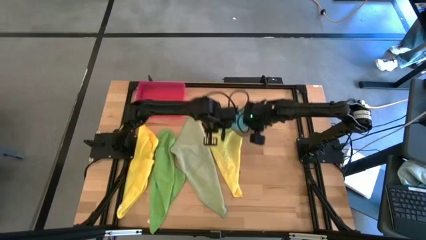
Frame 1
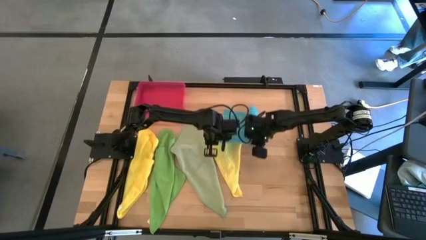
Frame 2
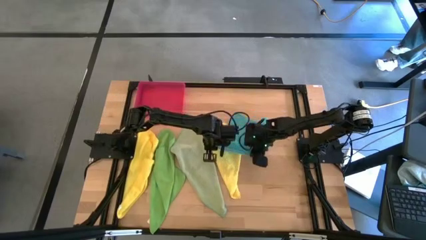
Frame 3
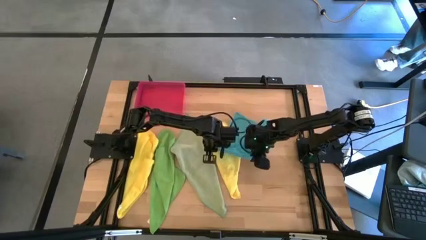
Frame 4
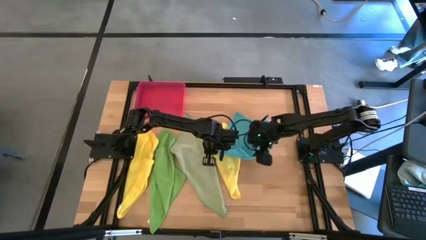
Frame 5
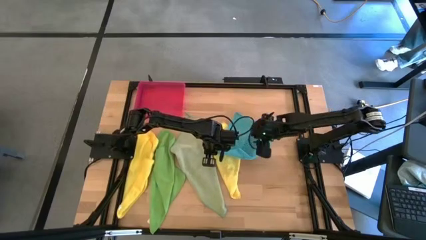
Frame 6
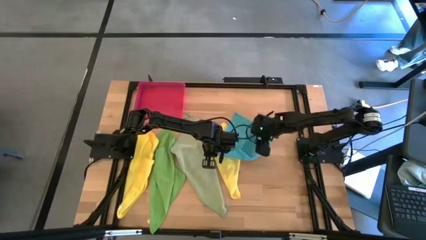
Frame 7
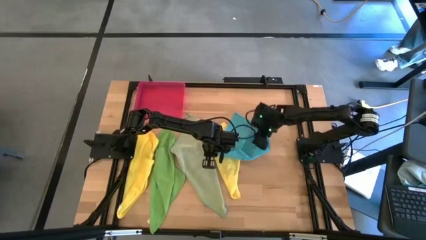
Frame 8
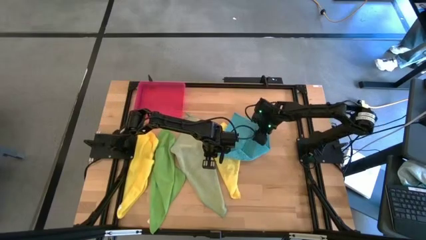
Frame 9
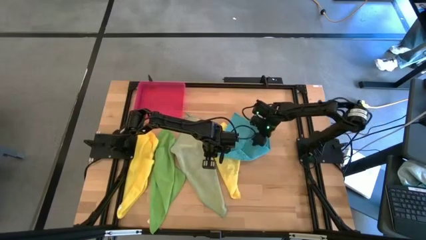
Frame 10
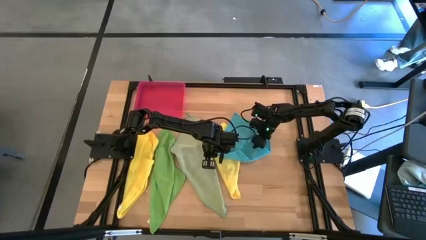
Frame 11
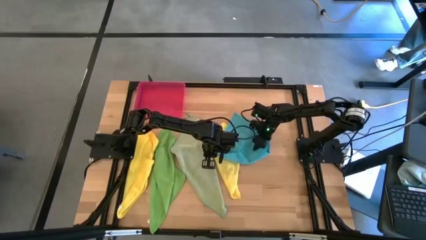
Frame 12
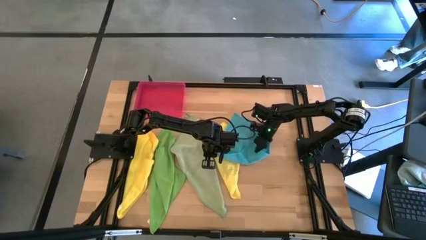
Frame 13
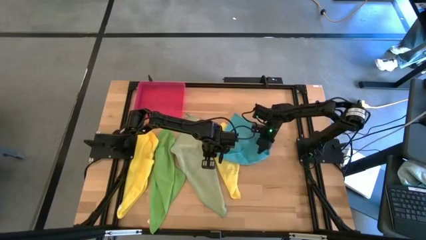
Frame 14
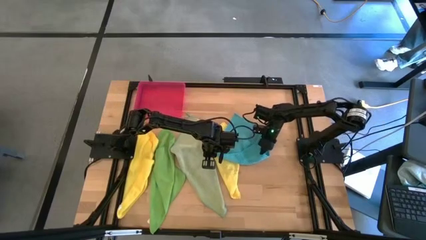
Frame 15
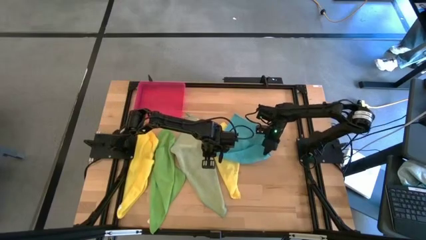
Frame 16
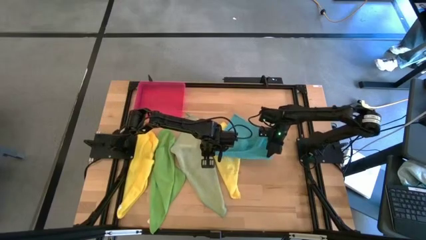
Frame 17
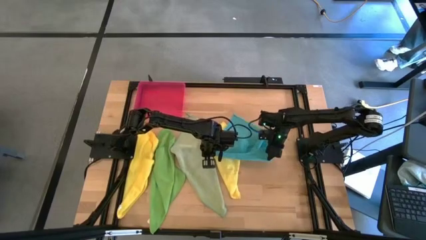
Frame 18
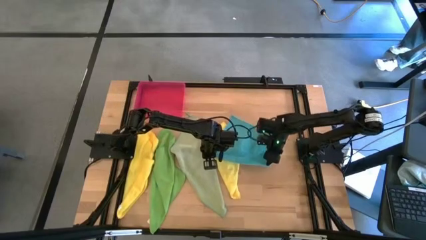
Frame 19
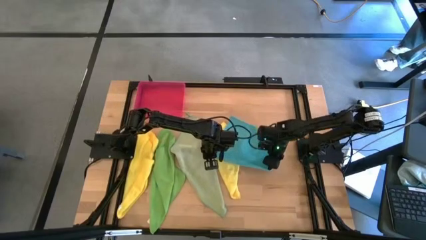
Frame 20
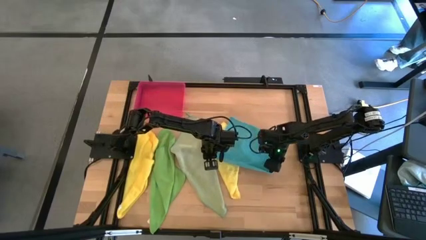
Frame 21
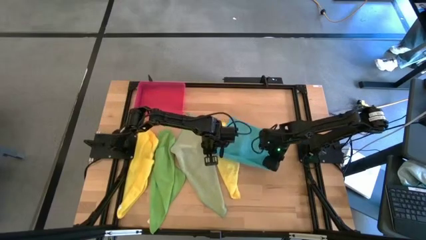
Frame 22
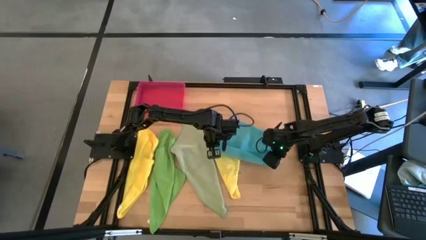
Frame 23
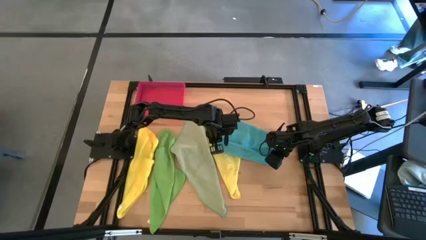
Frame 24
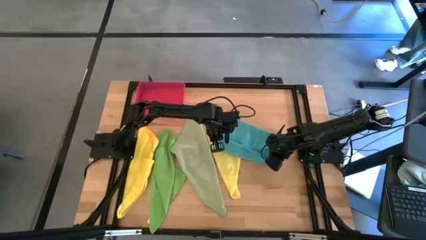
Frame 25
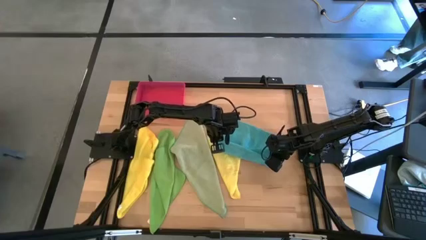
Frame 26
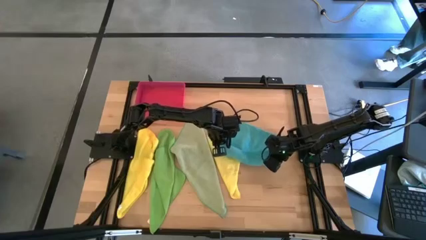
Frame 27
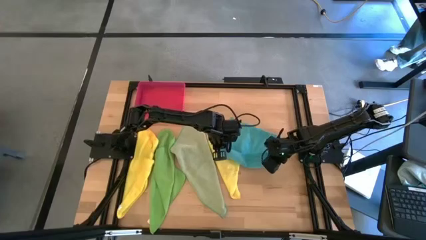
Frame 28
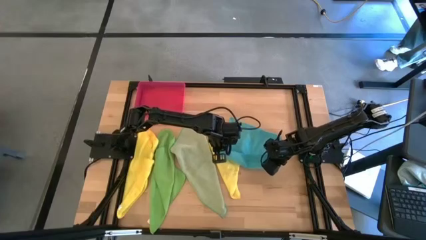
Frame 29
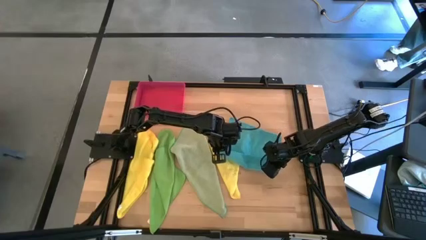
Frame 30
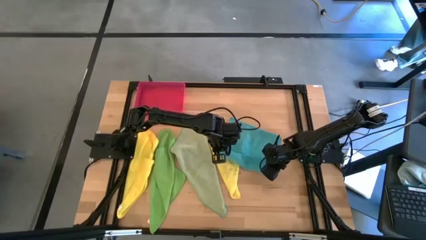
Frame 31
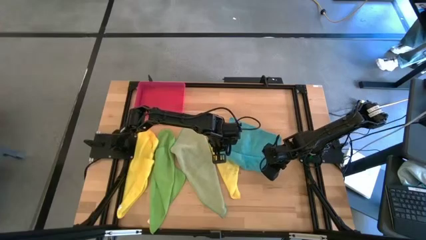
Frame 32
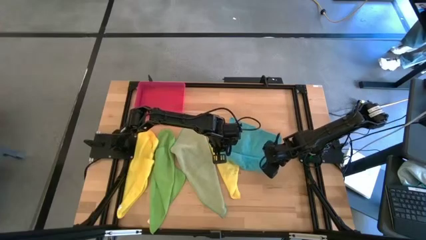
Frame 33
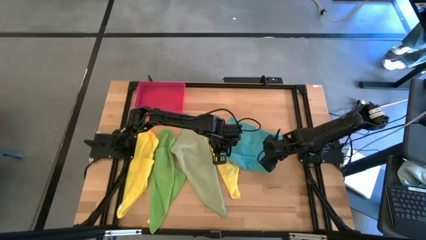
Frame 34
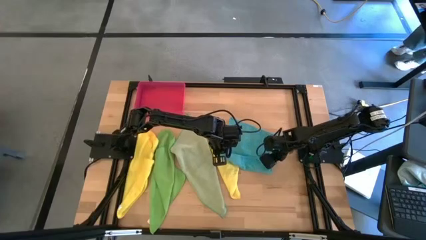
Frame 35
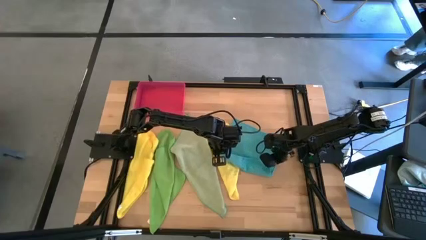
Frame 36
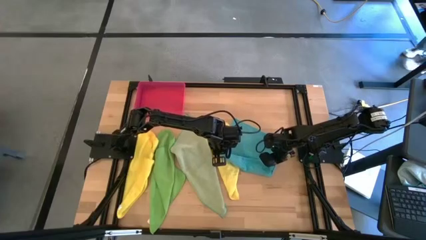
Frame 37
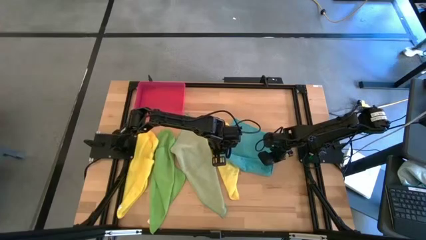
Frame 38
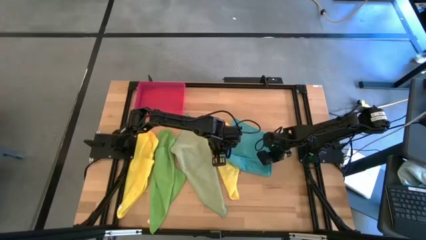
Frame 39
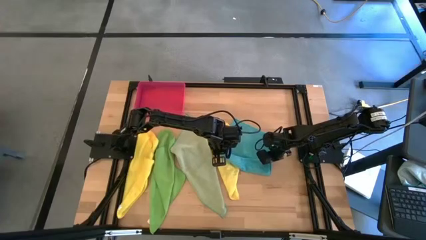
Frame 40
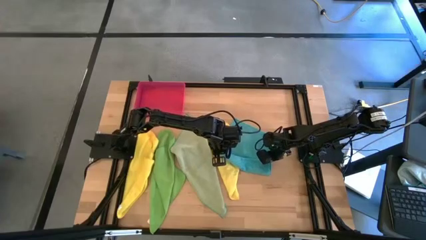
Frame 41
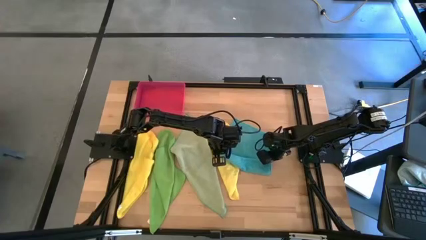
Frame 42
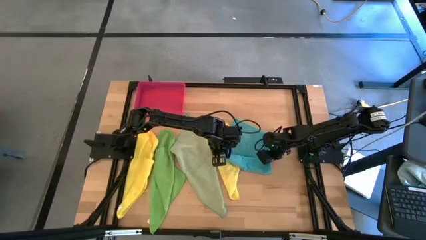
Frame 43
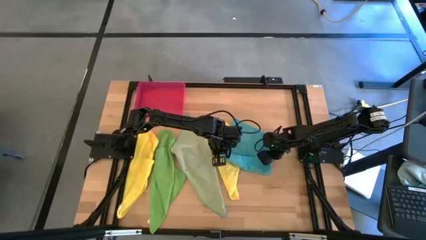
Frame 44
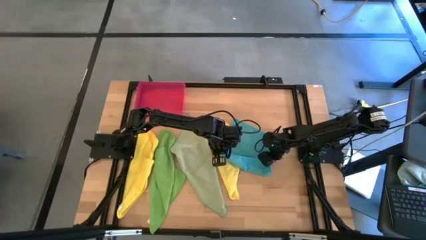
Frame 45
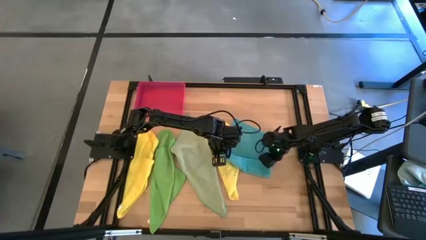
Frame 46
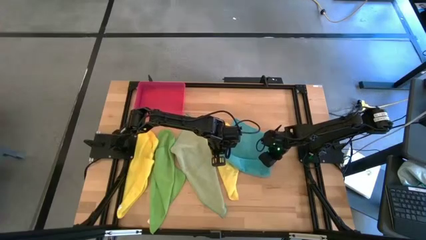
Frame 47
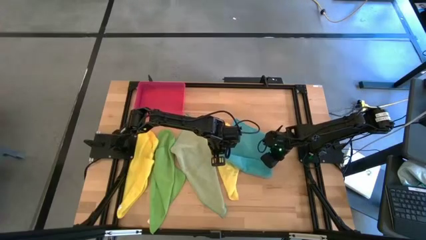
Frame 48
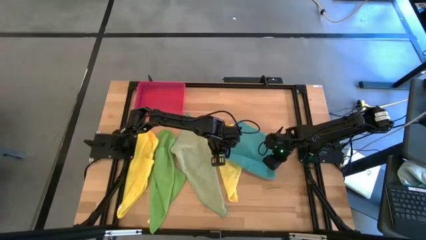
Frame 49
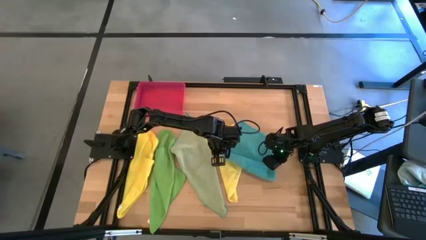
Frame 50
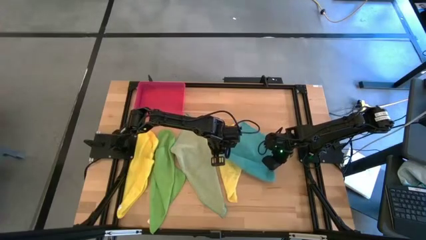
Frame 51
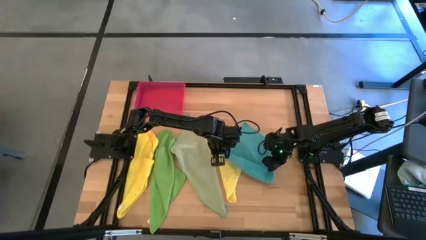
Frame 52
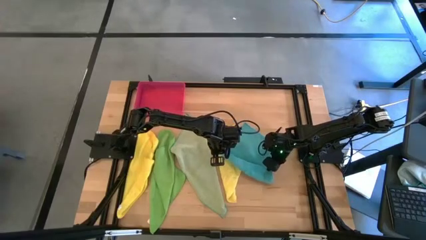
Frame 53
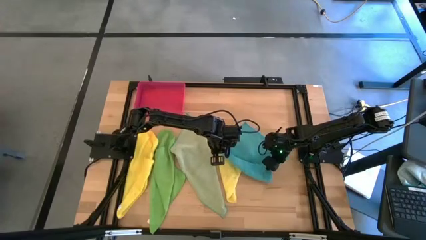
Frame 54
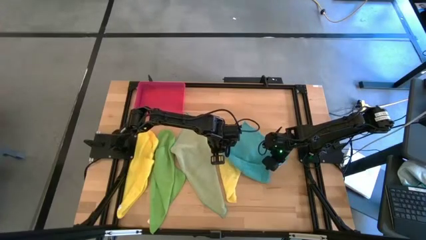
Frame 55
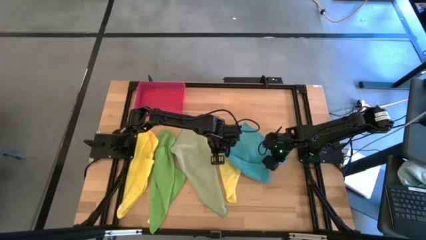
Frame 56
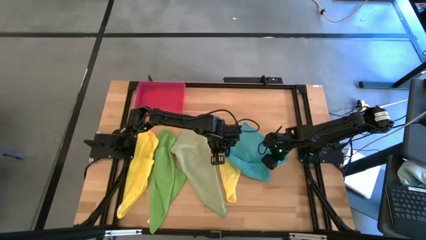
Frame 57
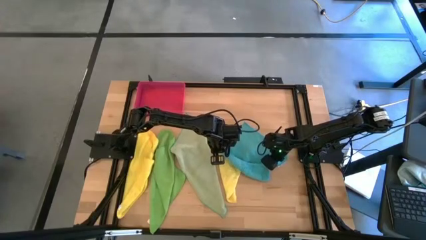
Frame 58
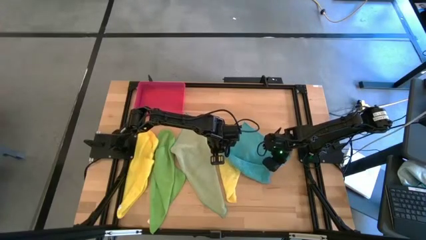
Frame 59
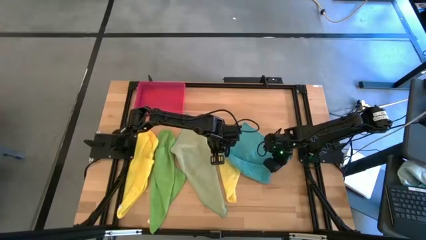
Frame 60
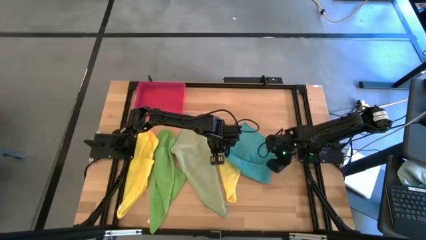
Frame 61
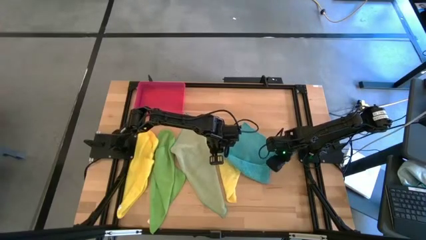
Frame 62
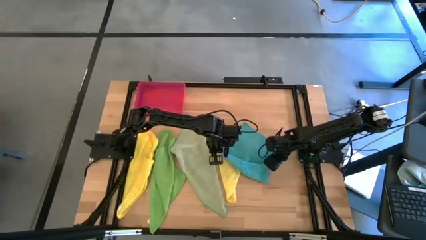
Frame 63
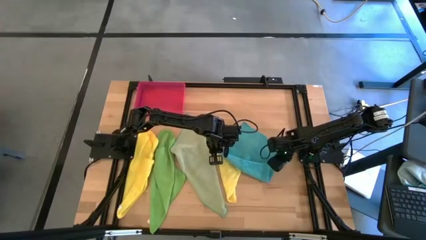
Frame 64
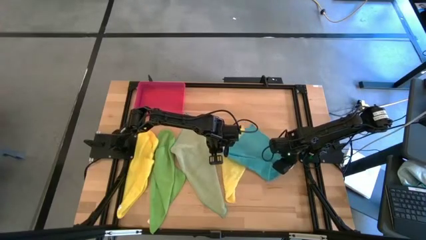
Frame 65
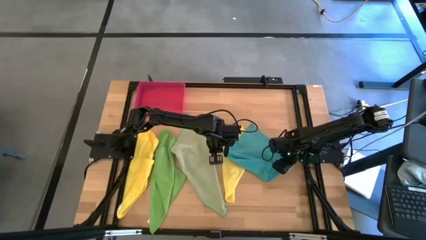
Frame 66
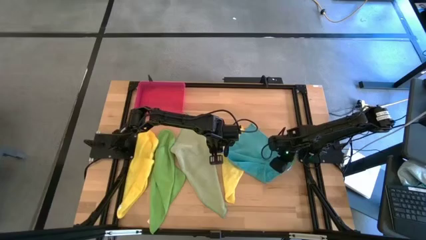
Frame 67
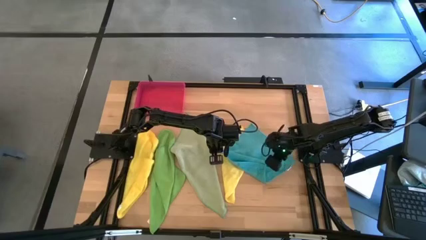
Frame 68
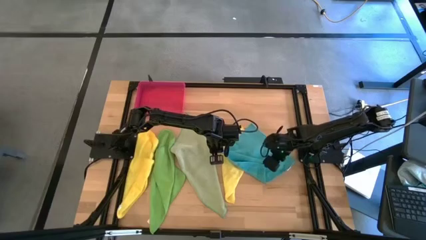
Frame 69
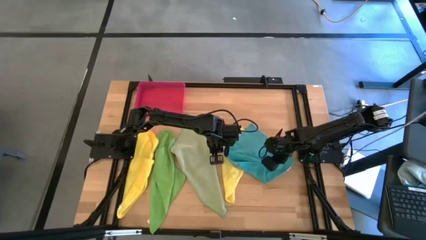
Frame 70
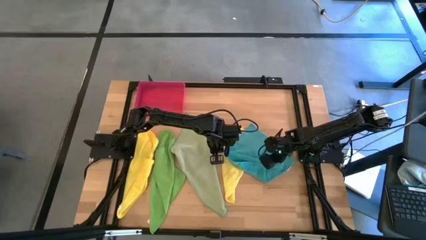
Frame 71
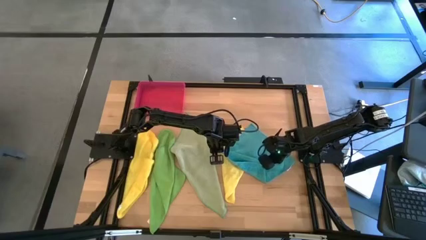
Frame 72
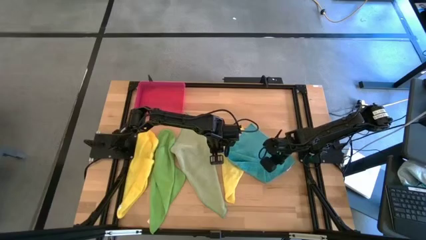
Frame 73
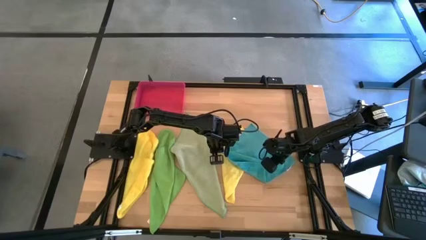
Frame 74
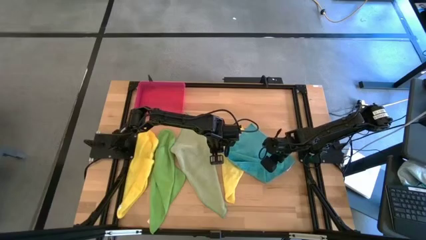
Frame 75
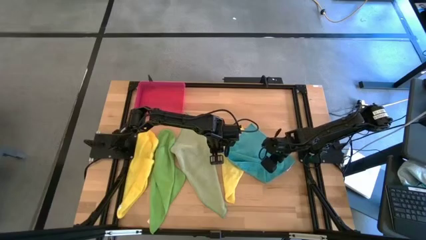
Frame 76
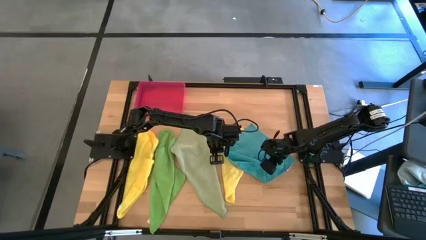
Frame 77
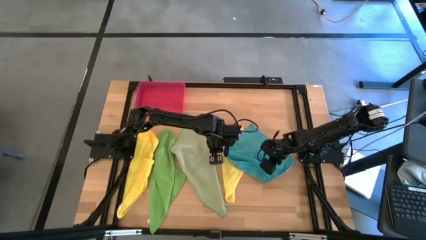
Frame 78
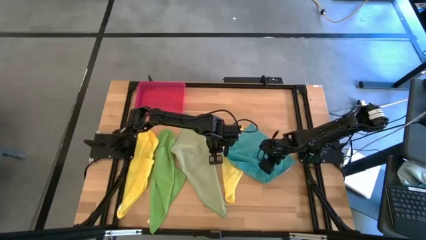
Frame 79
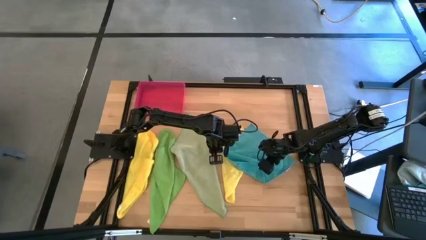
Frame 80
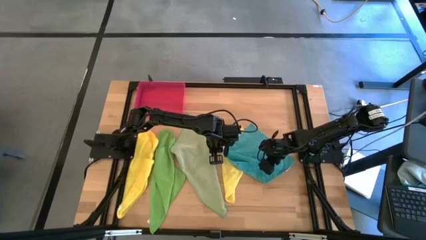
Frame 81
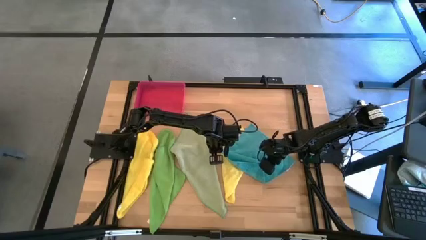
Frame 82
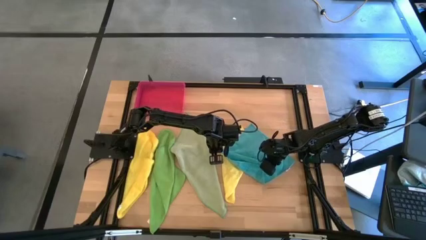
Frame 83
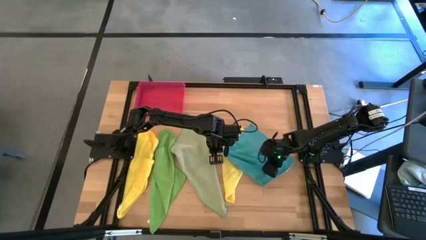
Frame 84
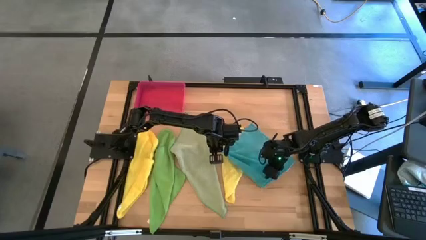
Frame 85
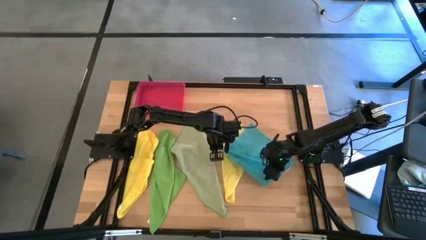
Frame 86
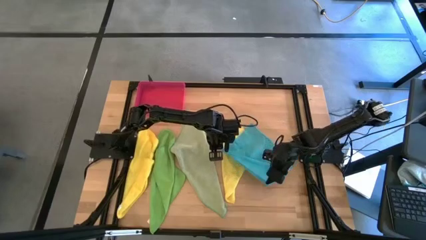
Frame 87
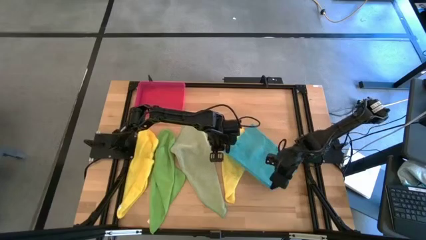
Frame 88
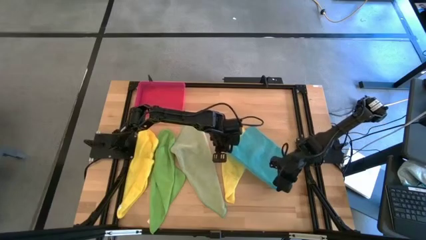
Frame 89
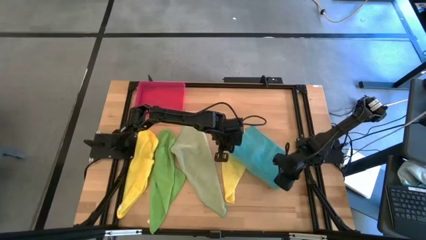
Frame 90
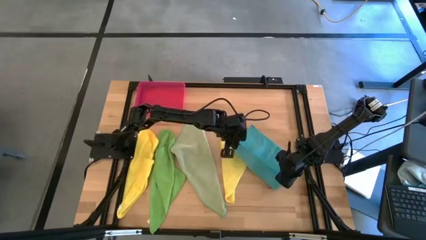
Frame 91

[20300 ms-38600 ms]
Task: Fold microfiber towels
Fold the blue microfiber towel
